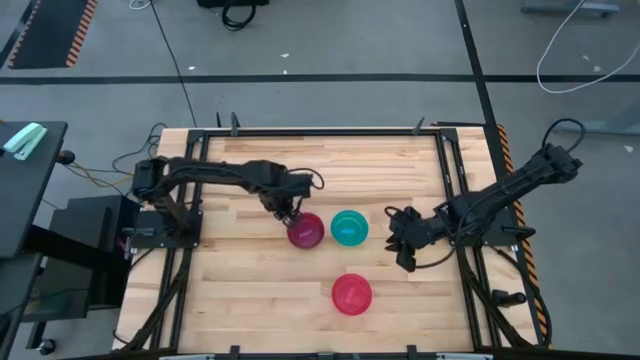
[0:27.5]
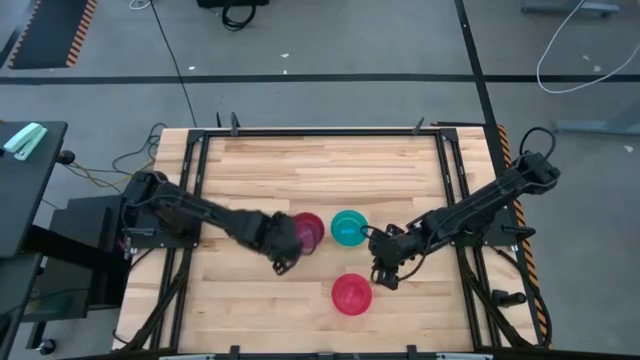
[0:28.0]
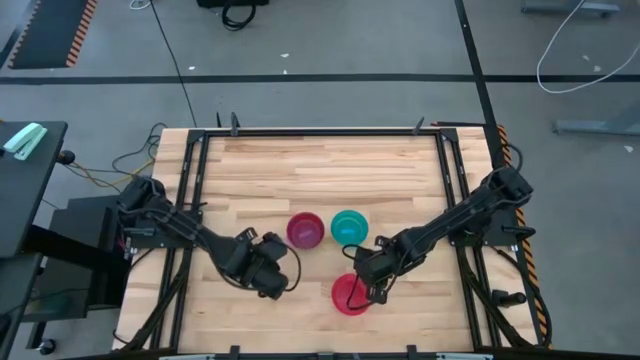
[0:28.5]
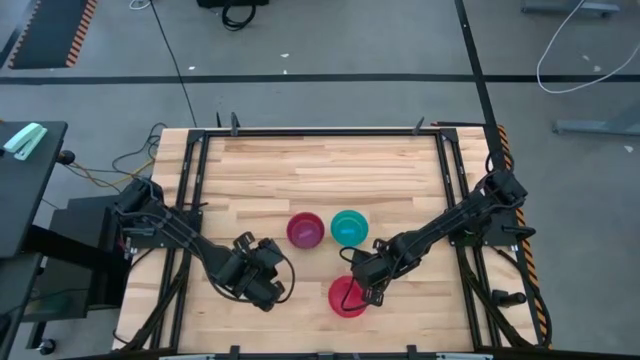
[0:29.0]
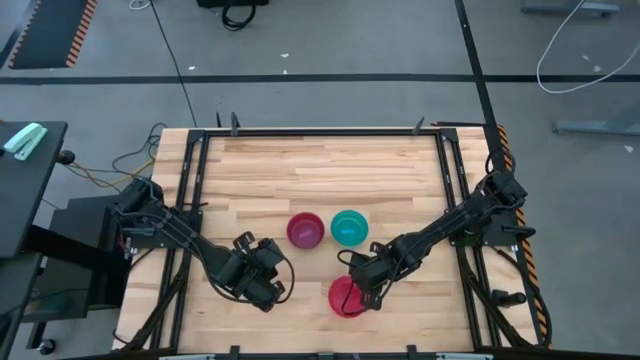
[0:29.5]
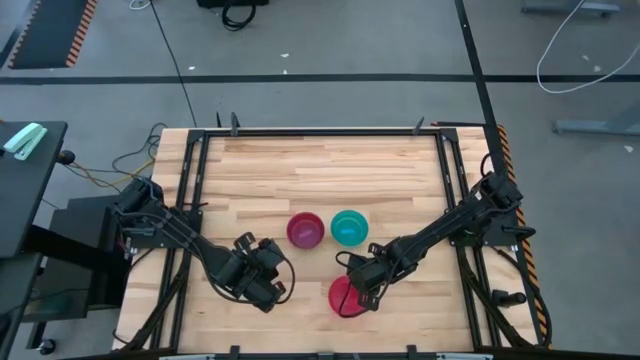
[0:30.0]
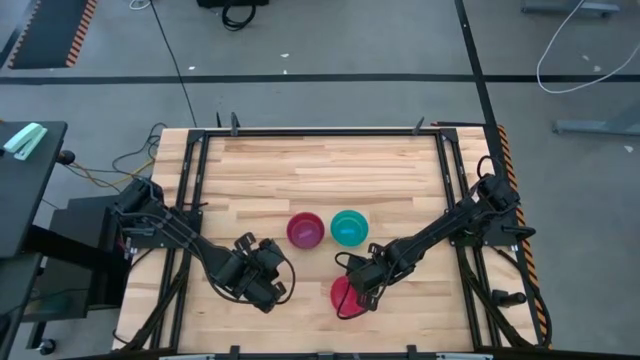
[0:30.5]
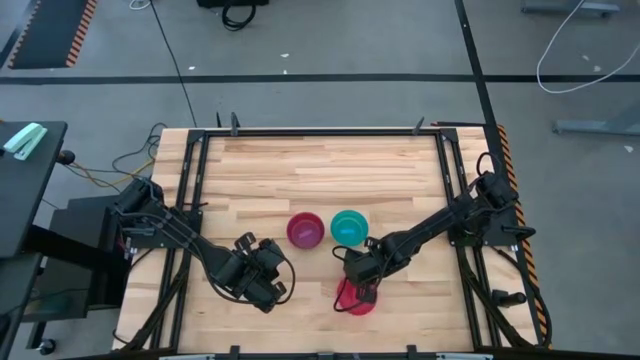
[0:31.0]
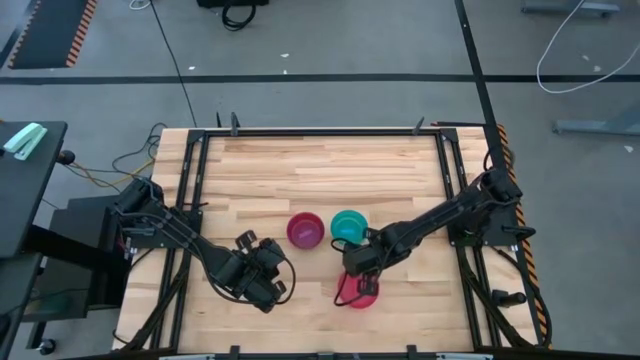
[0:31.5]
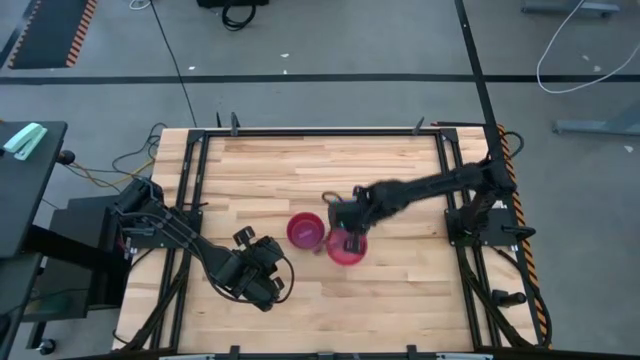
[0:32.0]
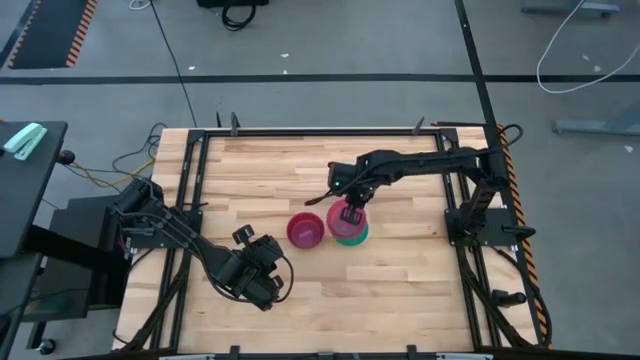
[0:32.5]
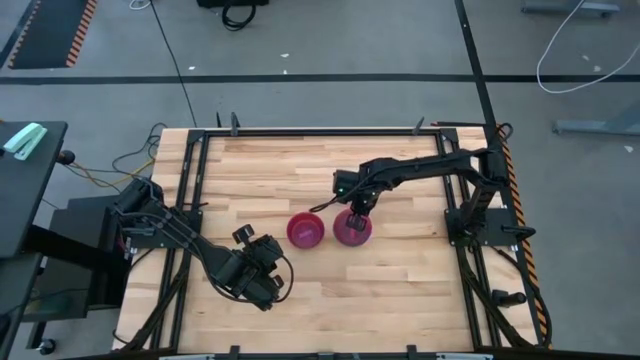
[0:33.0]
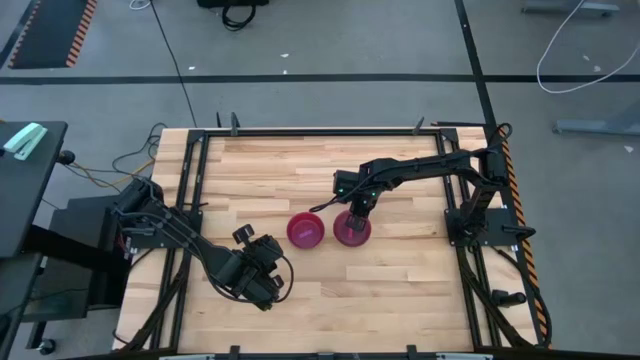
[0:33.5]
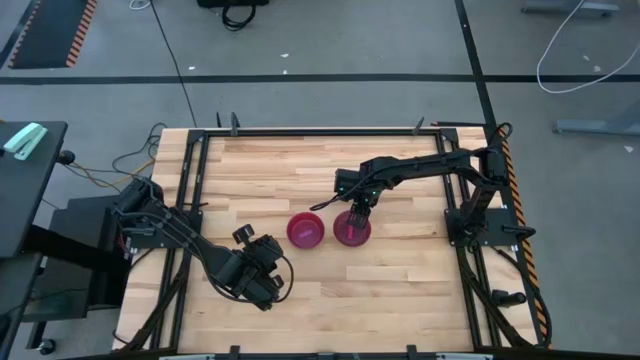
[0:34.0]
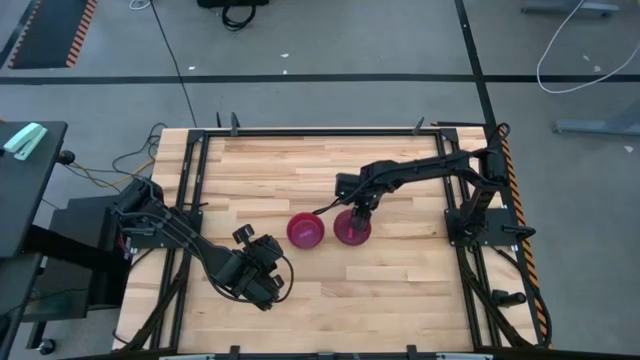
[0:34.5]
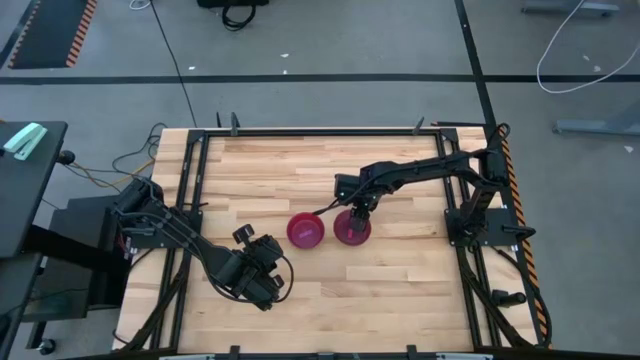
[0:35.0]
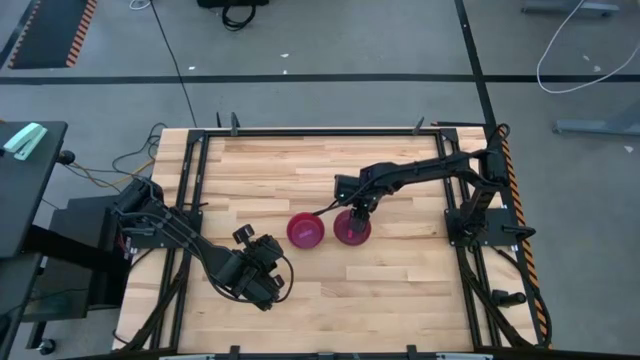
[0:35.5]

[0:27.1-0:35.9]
Task: Nest bowls inside each other
Stack the pink bowl on the blue bowl

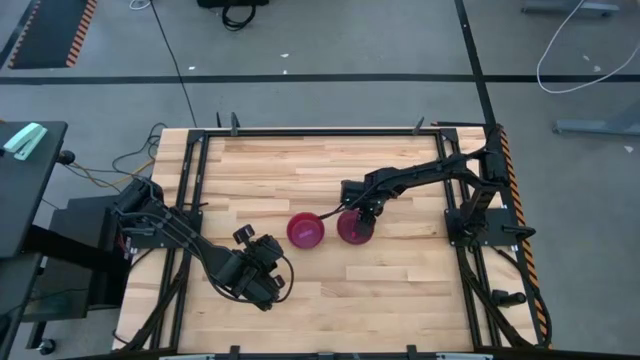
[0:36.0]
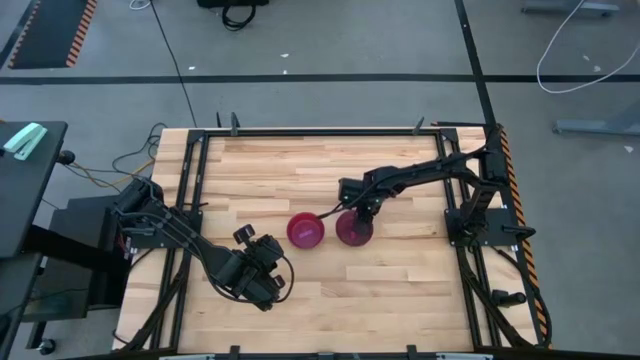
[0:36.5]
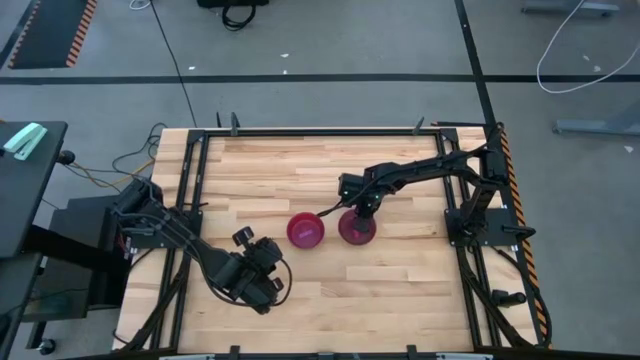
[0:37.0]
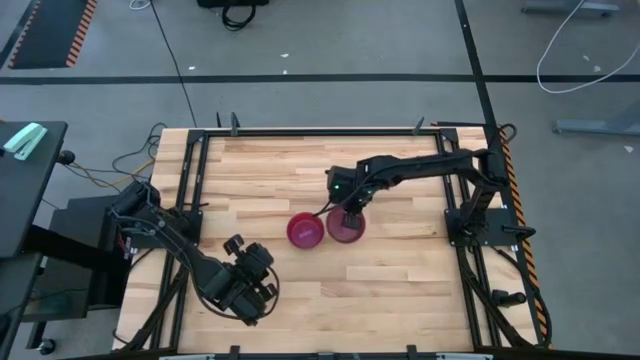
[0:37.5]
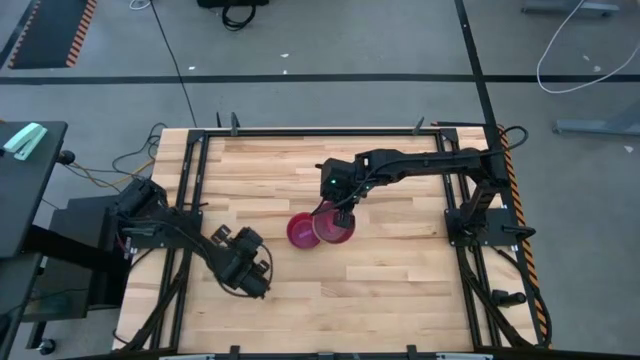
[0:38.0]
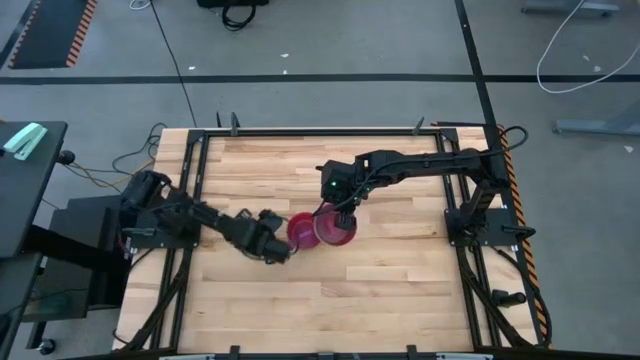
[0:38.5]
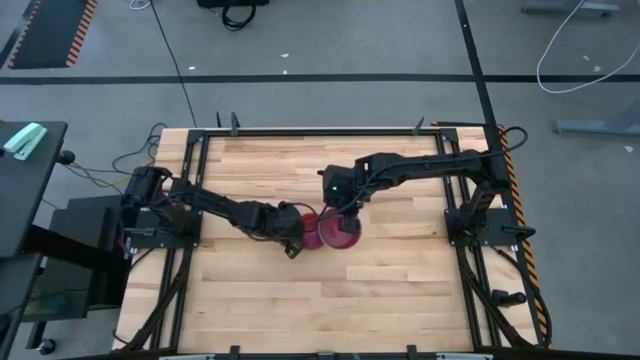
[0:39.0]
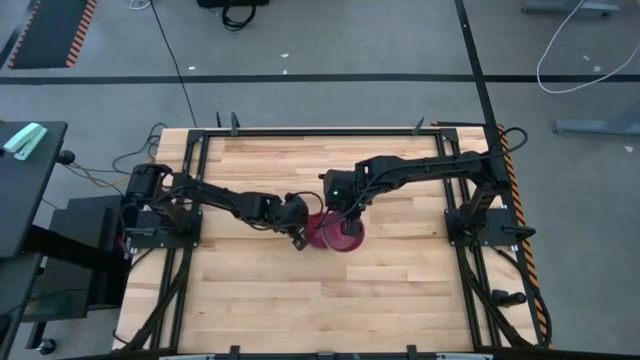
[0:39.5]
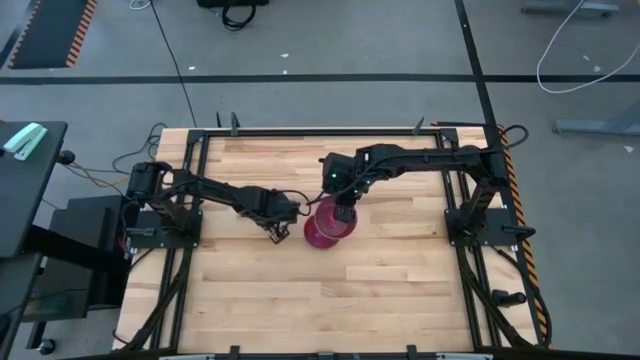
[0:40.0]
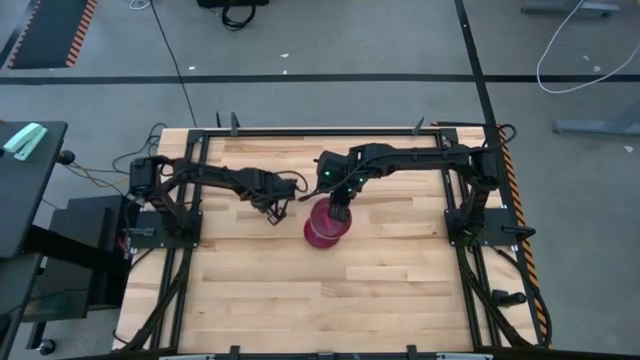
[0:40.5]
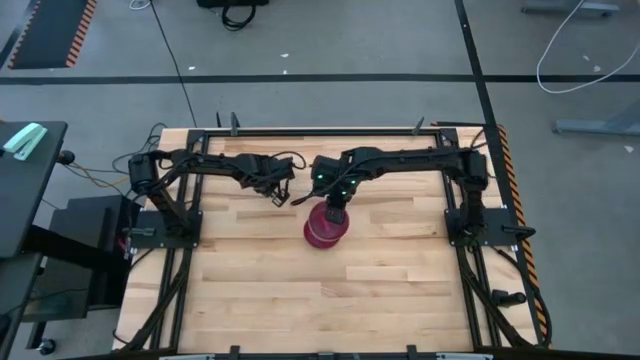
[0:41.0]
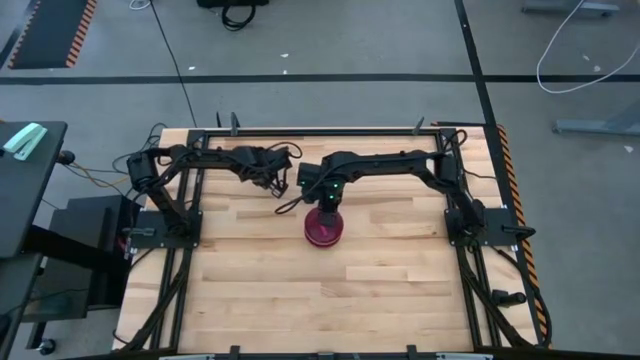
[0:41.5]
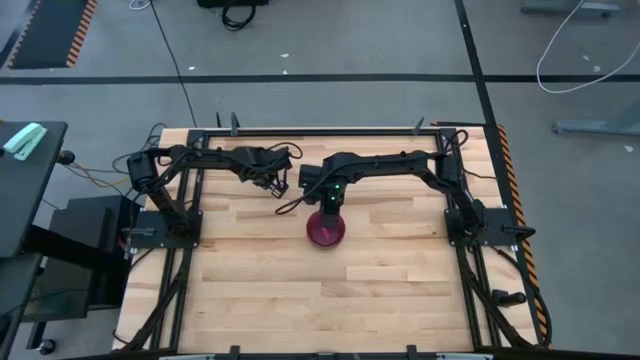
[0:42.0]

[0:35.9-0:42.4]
Stack the bowls on the other bowls

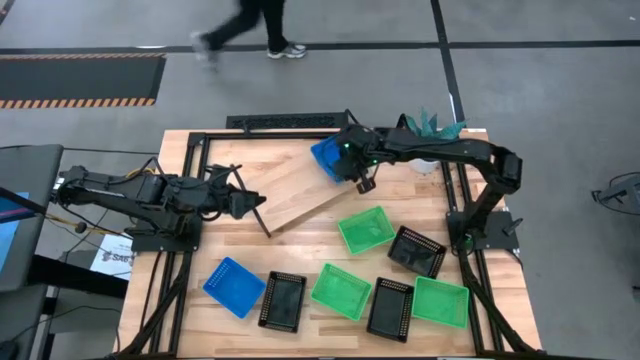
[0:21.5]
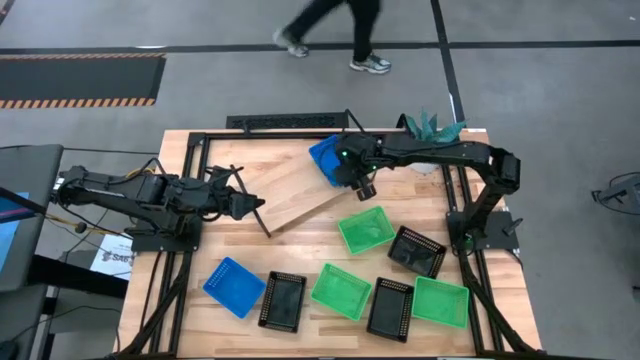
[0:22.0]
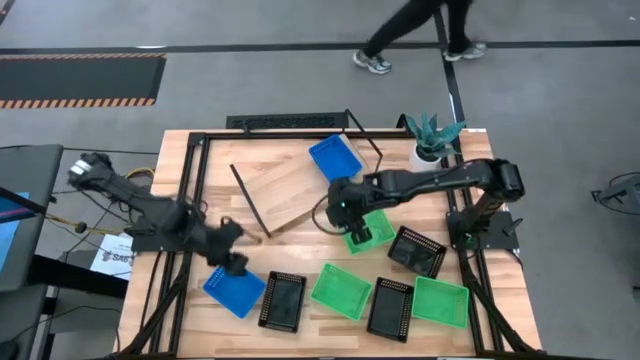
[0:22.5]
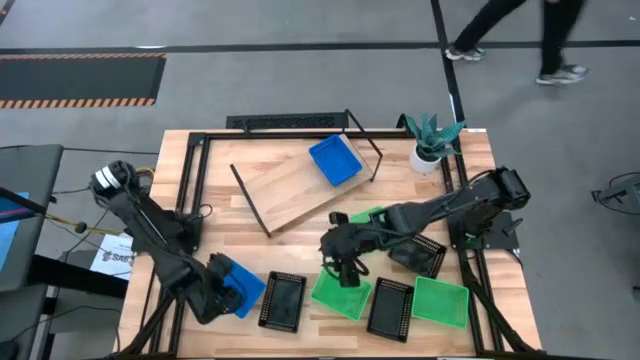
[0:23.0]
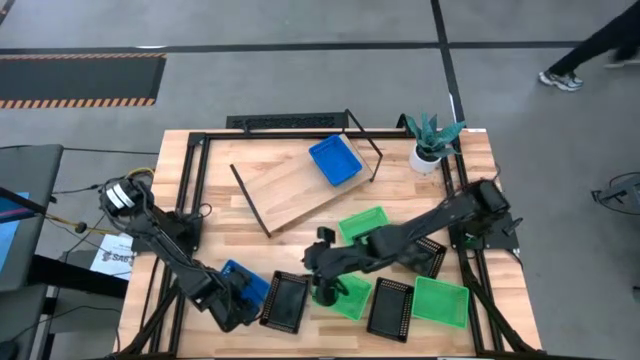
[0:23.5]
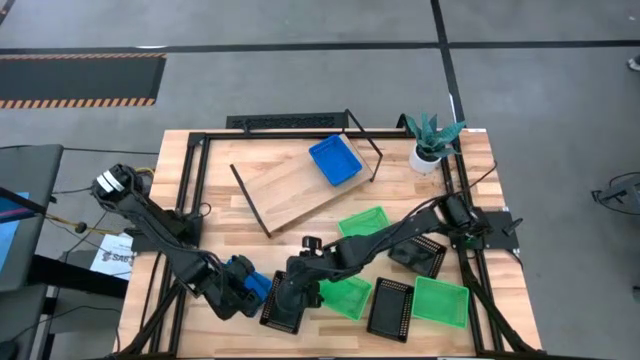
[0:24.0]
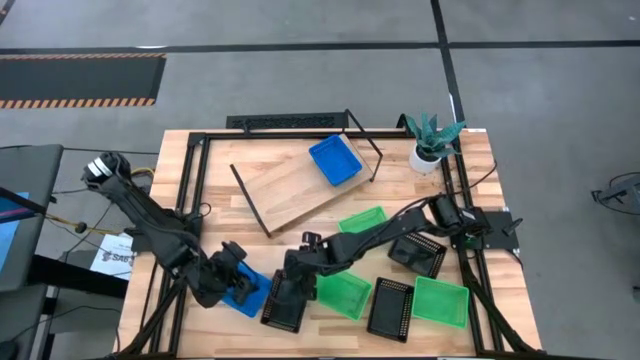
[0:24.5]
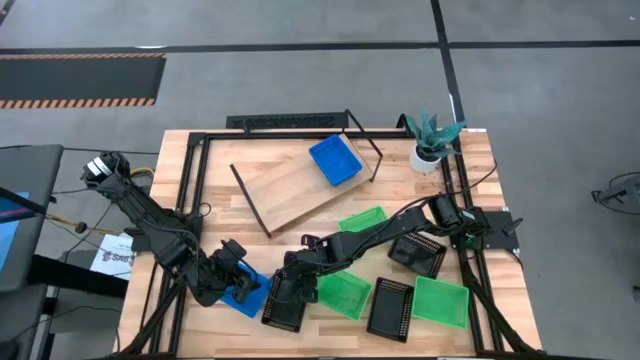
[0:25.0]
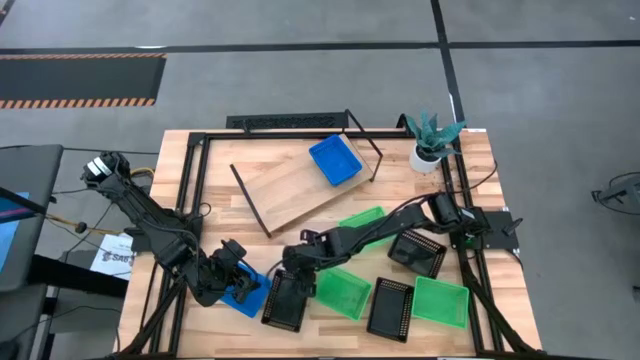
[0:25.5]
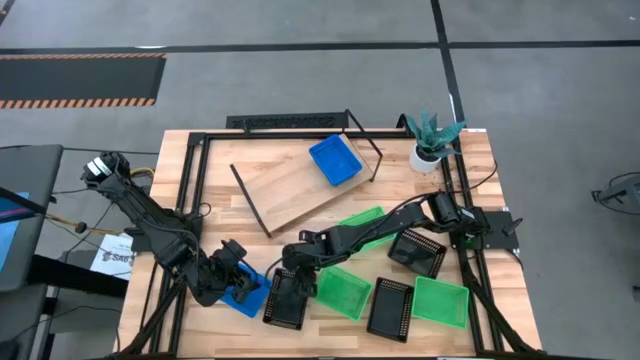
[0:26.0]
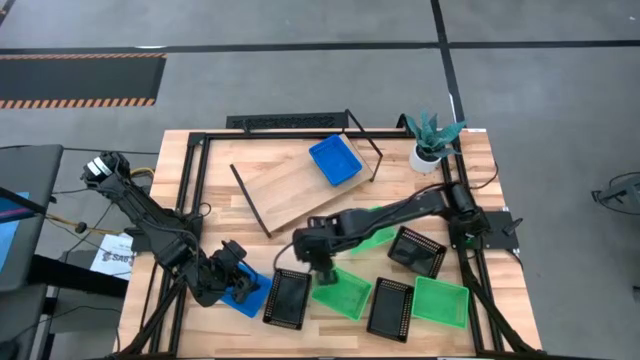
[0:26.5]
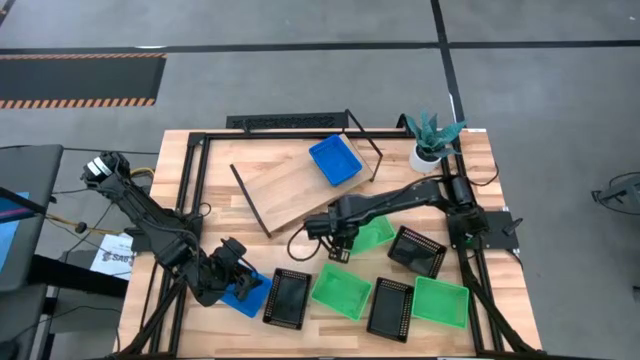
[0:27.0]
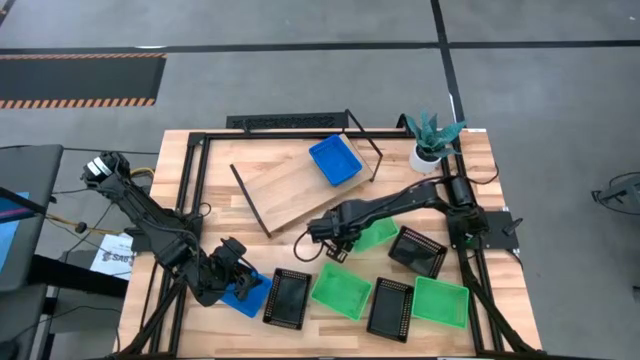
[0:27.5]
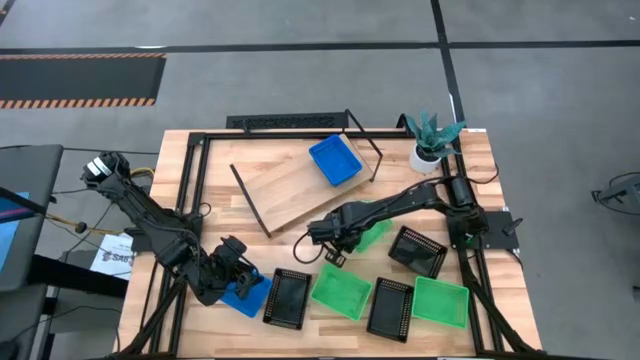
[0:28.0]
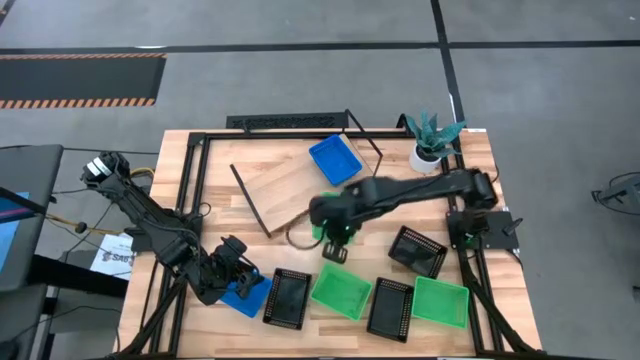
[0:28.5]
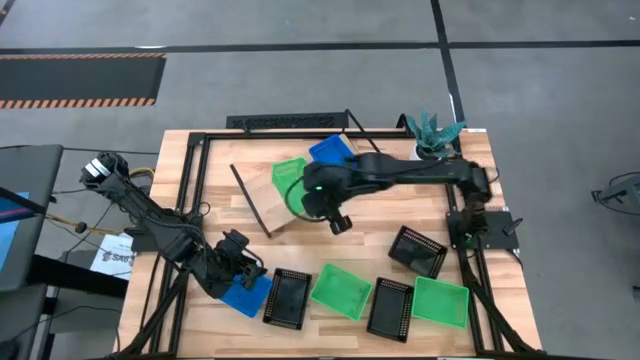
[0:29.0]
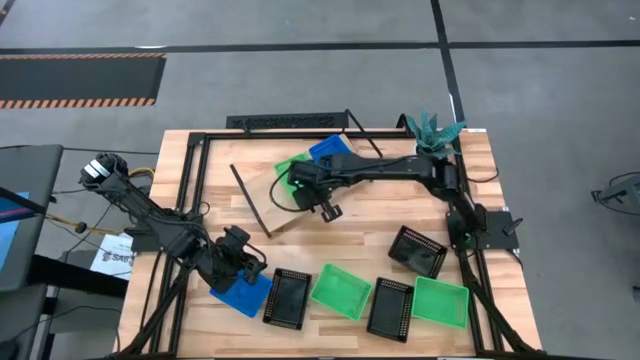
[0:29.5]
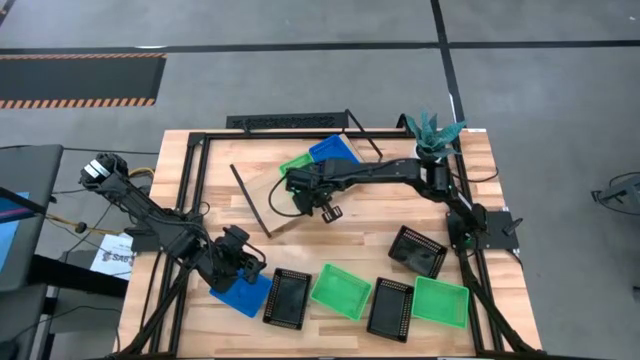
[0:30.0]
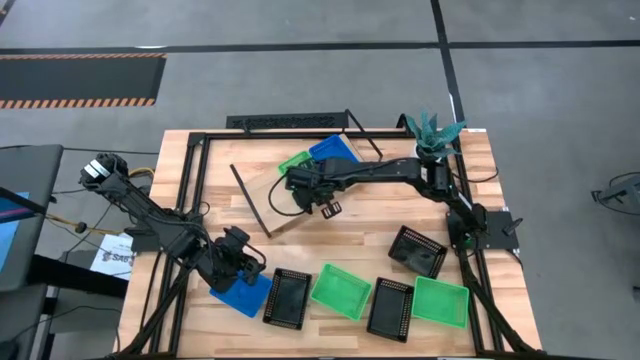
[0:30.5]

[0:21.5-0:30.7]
Task: Stack baskets on shelf by color
Put the top green bin on the shelf
